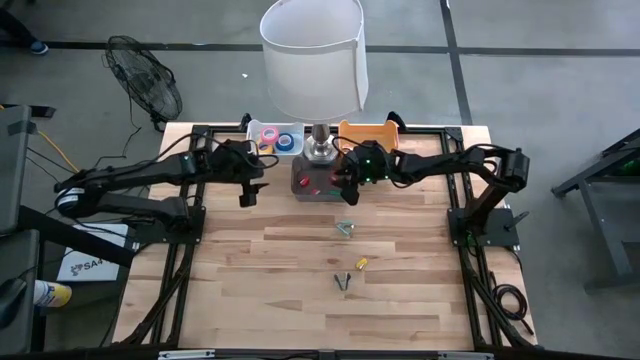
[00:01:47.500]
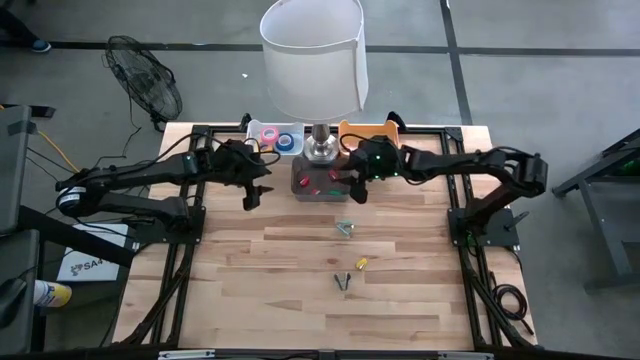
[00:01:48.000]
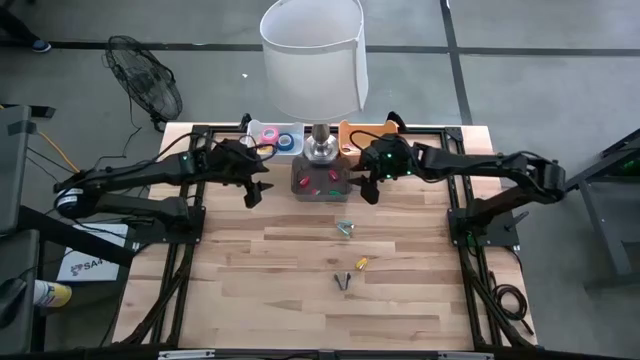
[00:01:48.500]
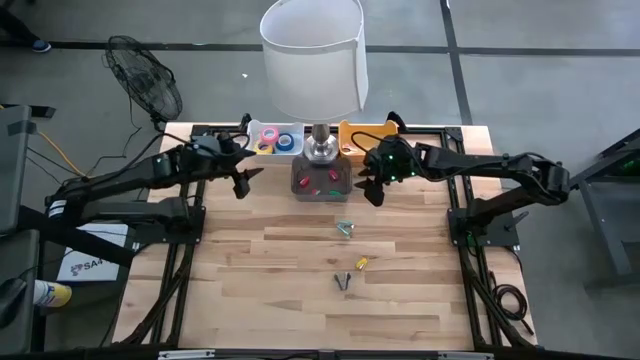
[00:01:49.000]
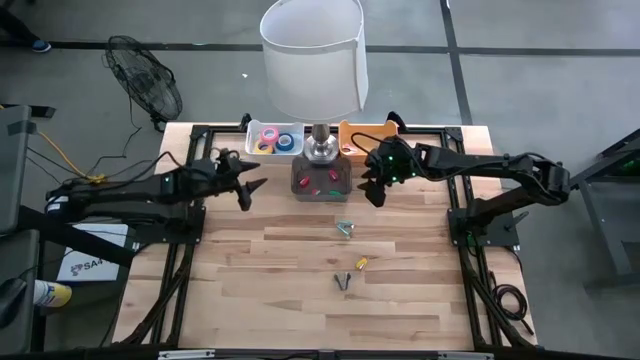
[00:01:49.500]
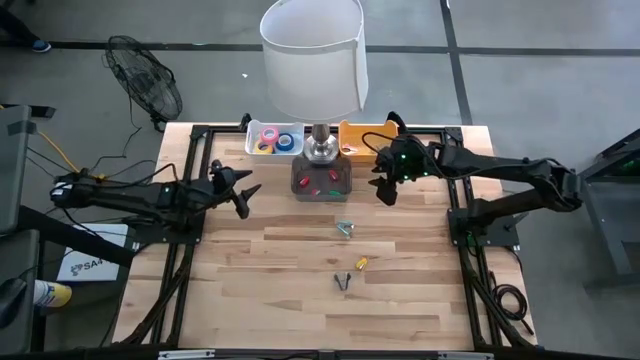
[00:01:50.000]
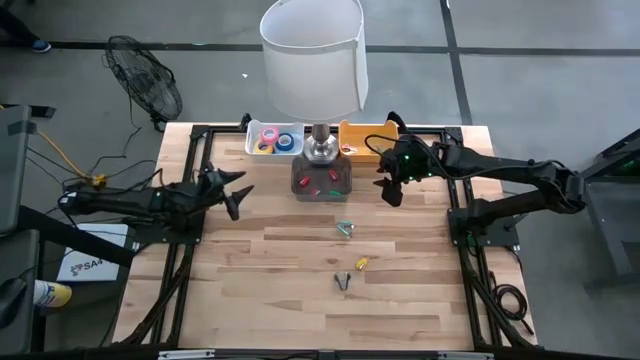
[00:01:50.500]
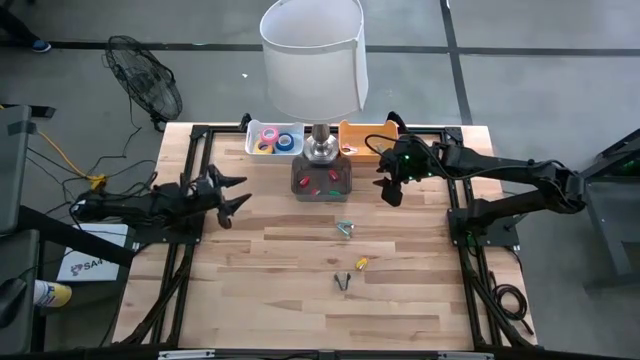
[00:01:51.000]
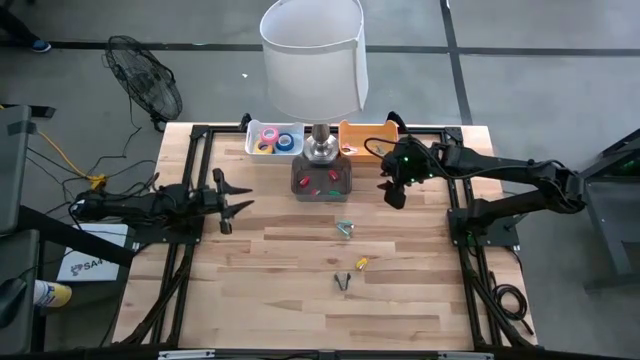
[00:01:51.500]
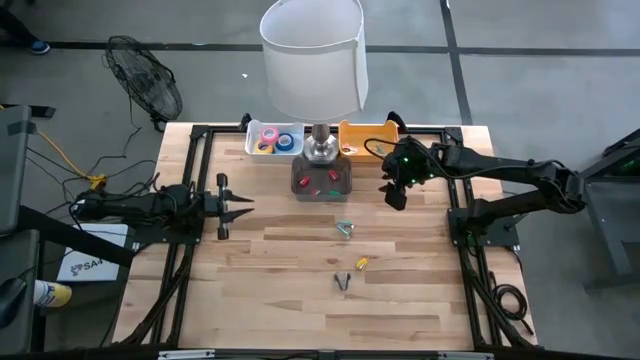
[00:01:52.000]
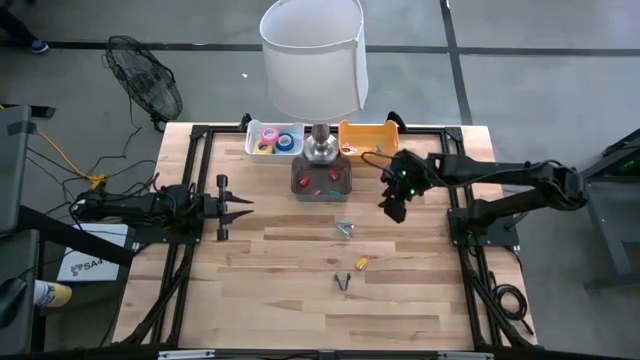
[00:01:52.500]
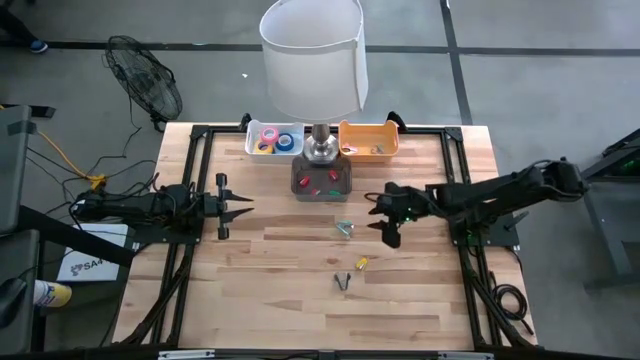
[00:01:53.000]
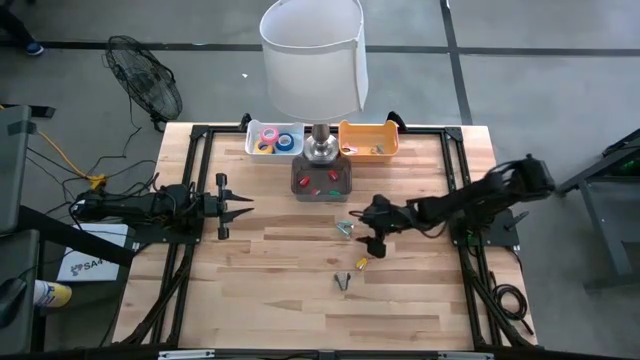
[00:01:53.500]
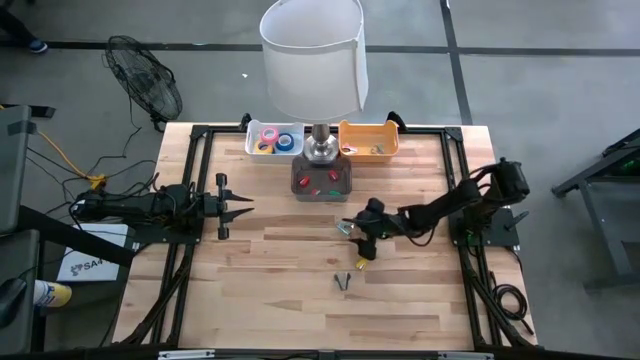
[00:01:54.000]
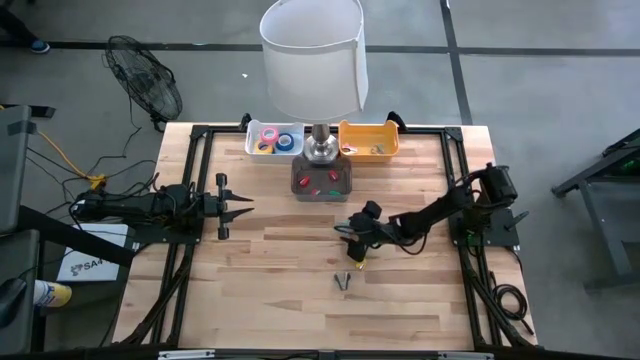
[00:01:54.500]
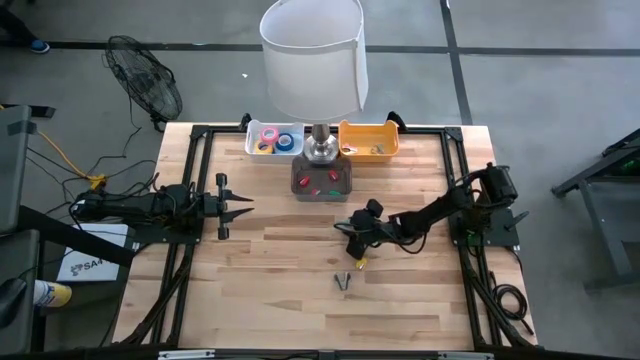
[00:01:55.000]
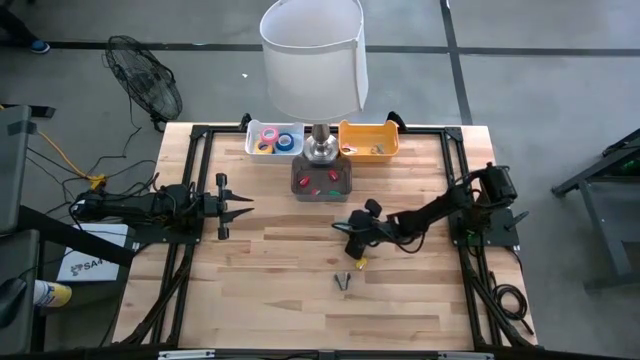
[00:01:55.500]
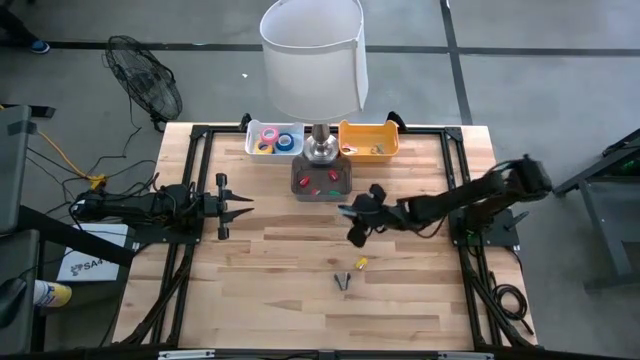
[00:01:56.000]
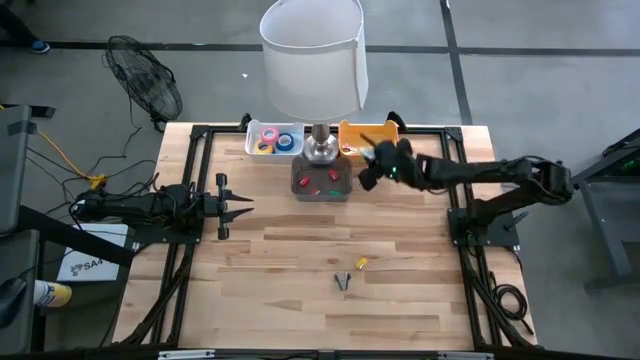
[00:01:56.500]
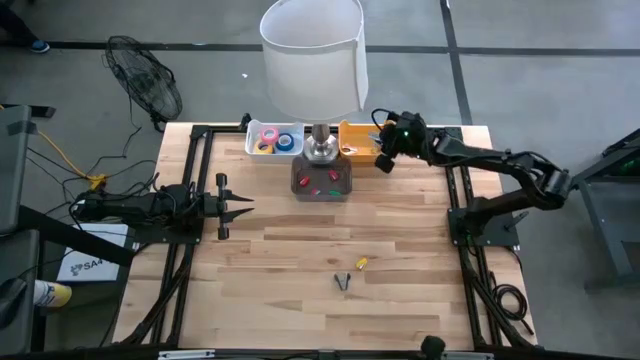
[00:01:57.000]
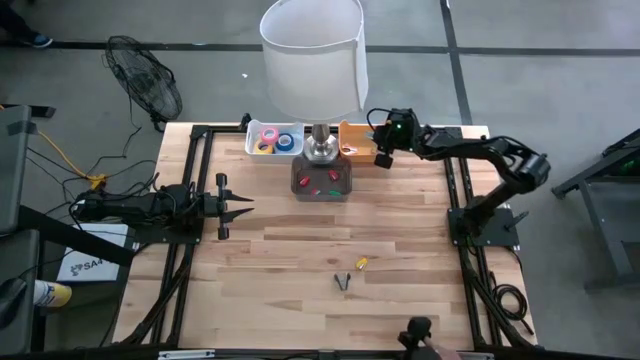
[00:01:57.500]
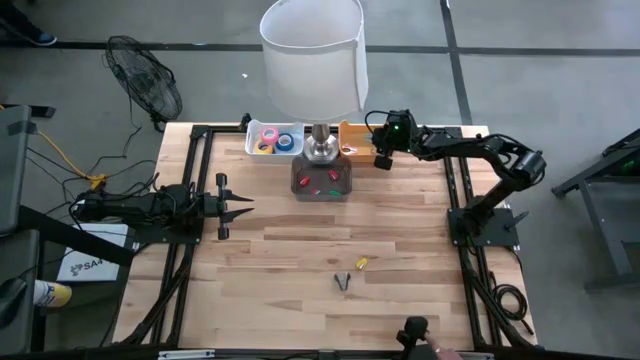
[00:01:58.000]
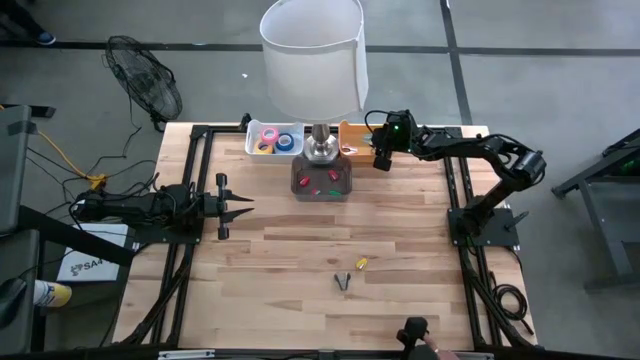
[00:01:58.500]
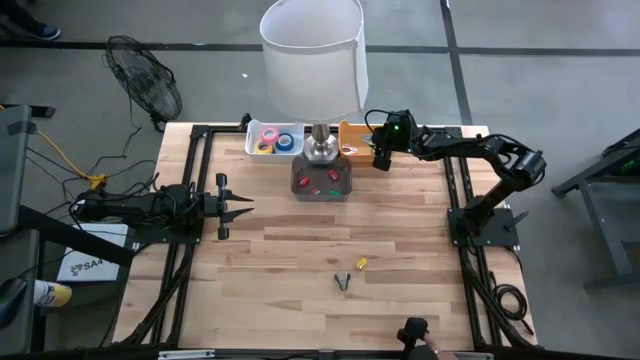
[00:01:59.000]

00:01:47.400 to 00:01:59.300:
Task: Pick and place Stapler, Stapler remover, tape
Put the blue staple remover into the yellow bin

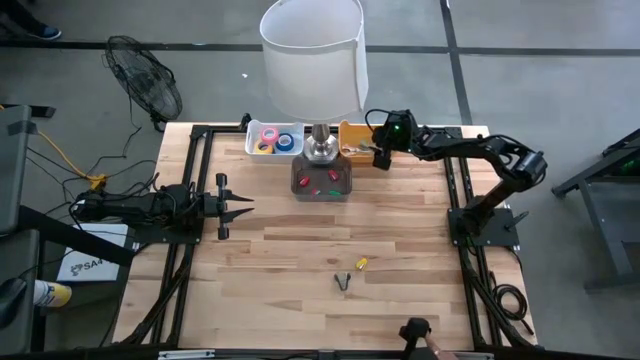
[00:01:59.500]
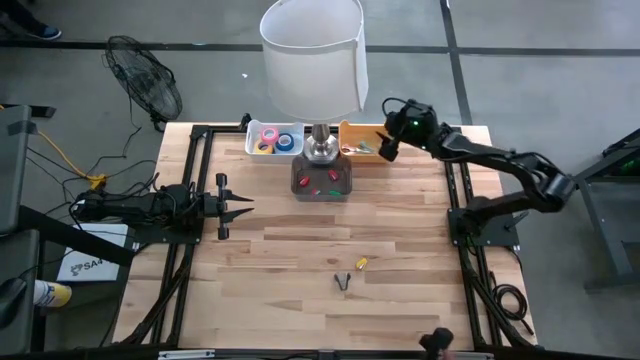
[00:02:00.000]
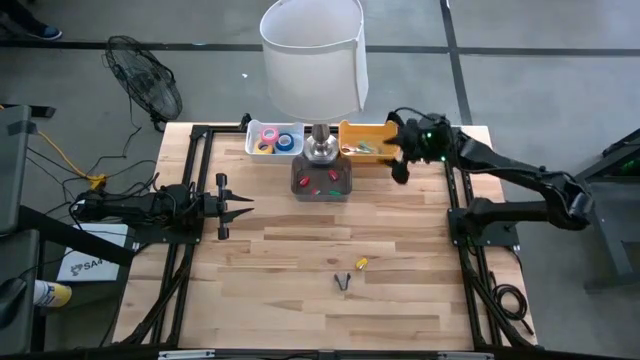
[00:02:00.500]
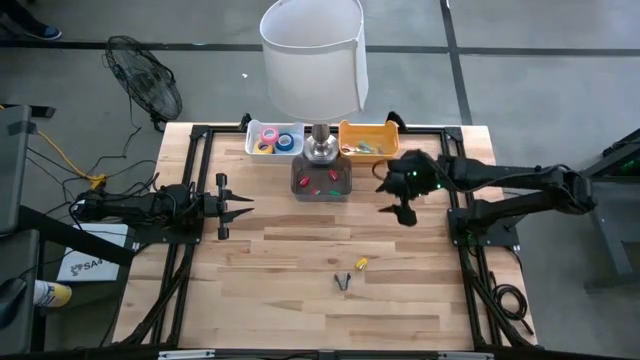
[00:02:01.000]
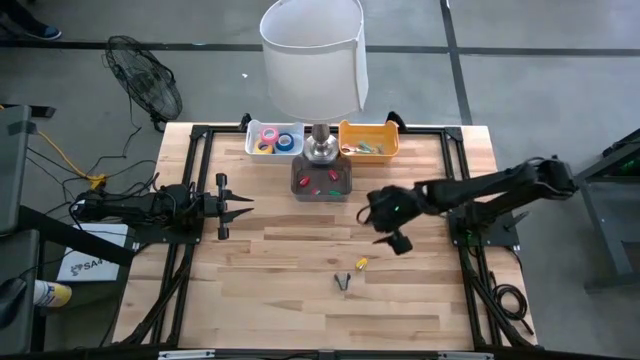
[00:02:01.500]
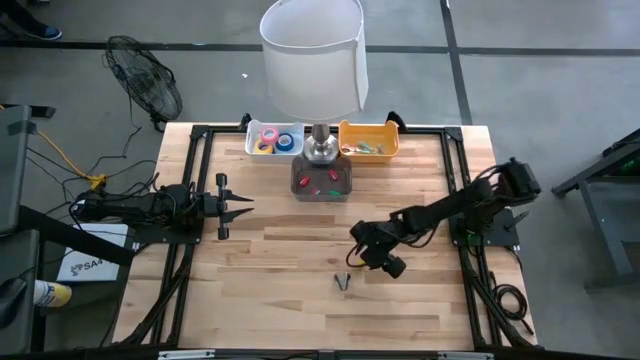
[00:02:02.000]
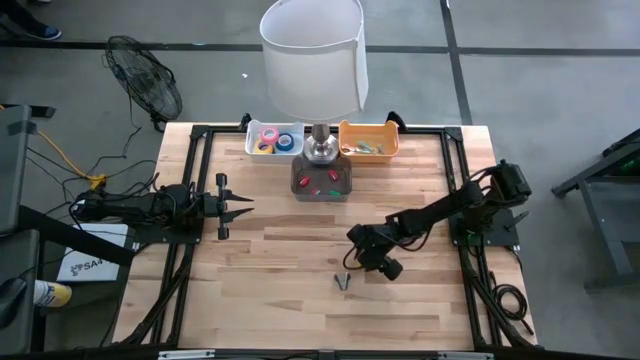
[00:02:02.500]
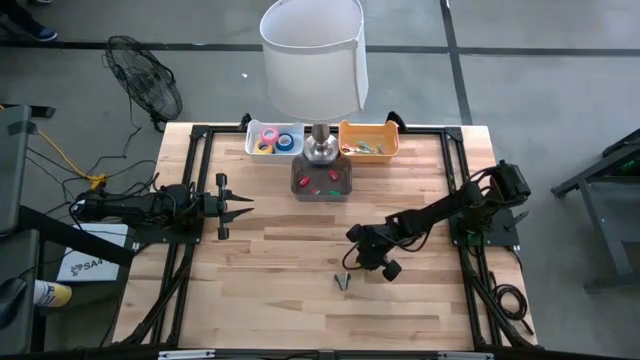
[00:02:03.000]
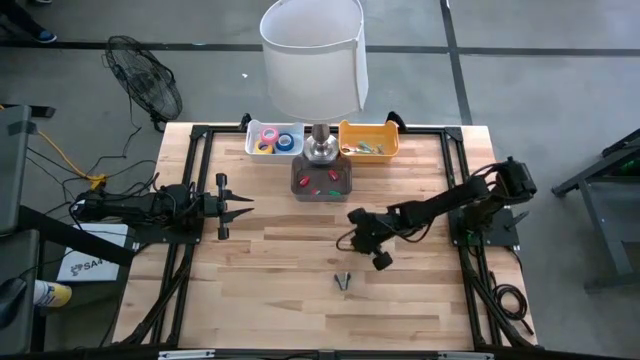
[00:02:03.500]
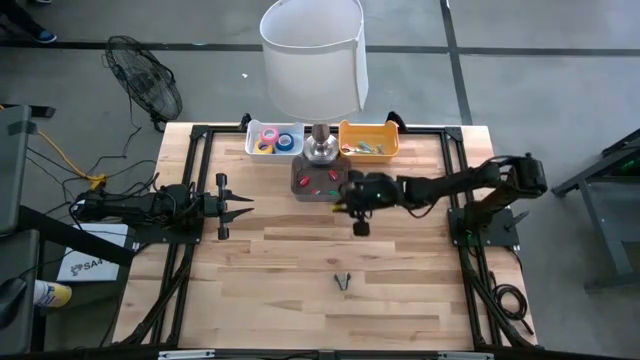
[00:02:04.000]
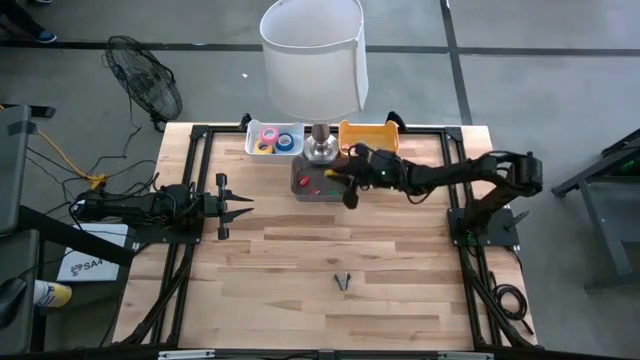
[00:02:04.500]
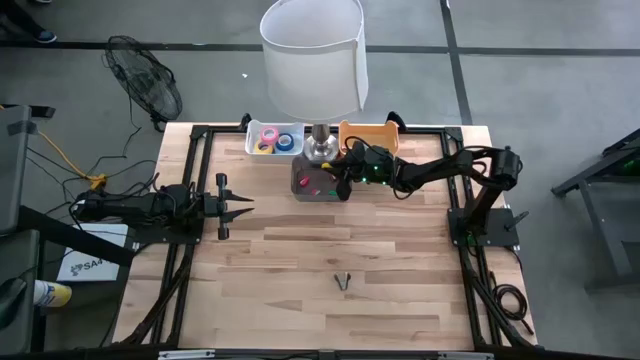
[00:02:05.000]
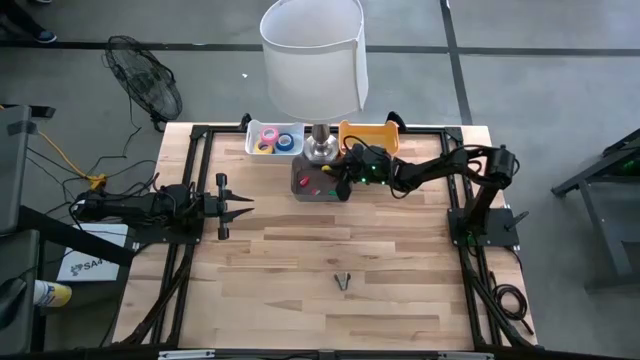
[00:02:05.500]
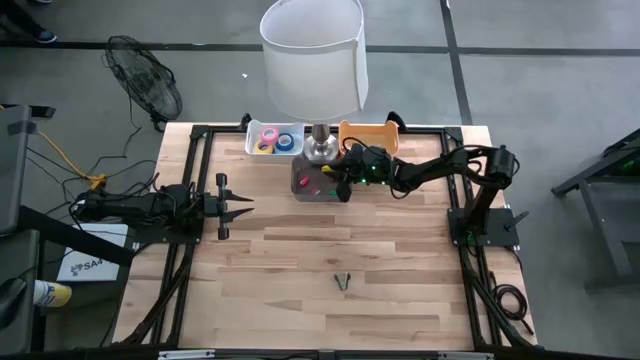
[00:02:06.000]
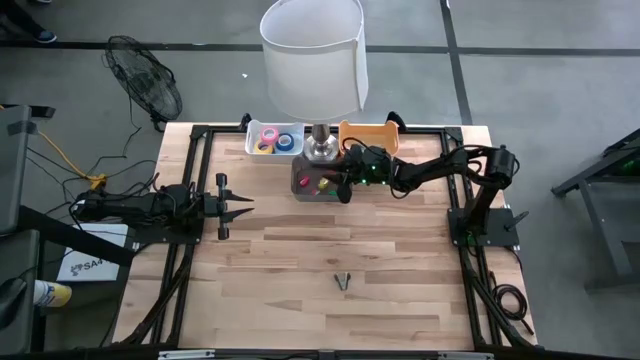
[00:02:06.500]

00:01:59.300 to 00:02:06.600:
Put the yellow stapler into the black bin

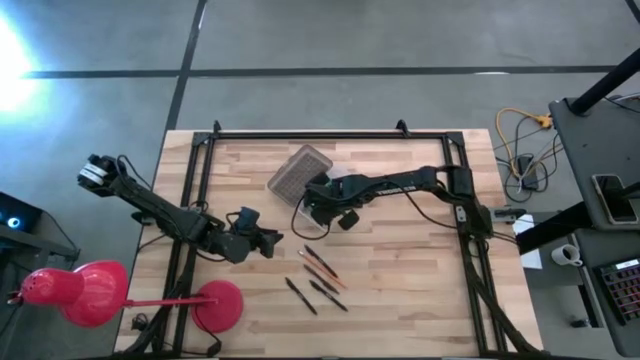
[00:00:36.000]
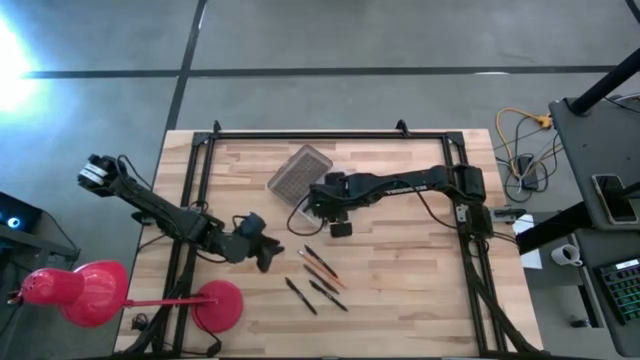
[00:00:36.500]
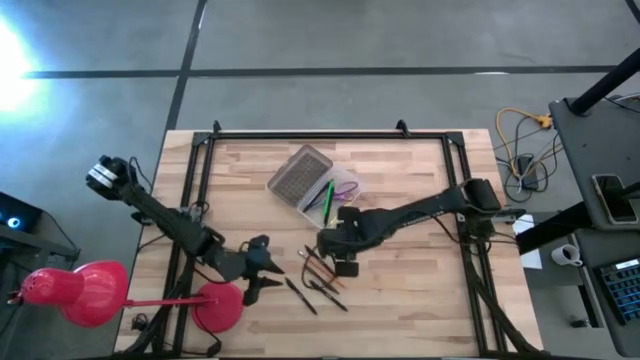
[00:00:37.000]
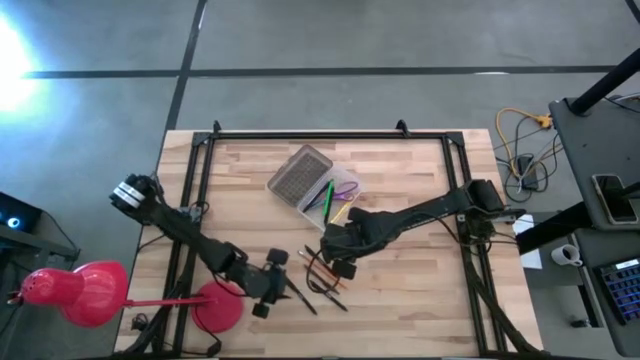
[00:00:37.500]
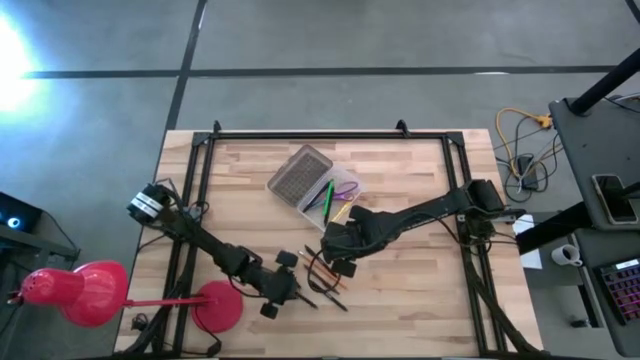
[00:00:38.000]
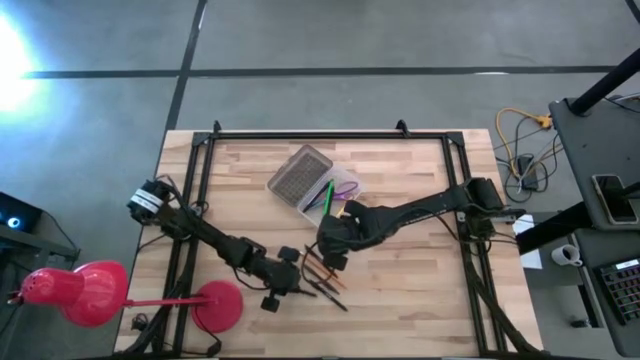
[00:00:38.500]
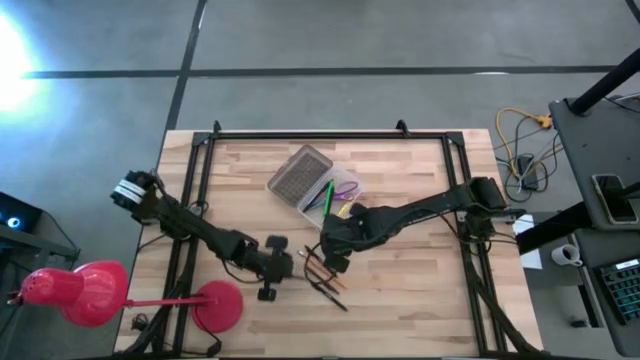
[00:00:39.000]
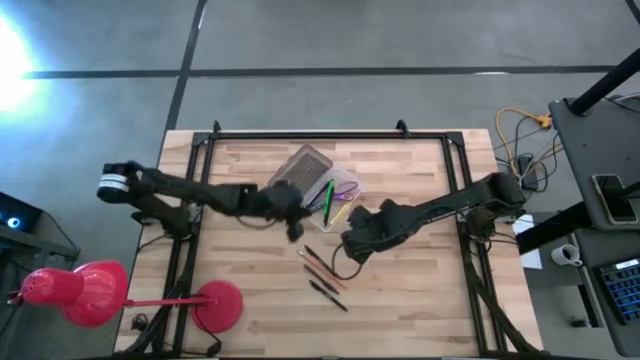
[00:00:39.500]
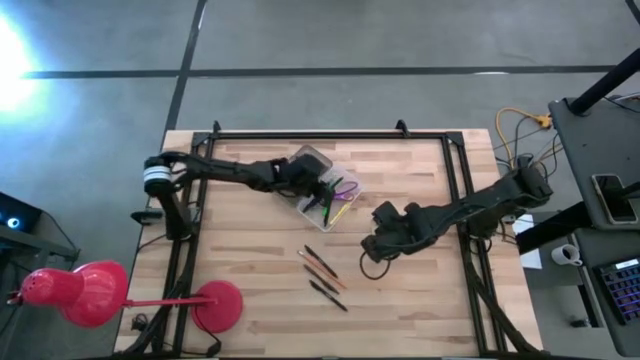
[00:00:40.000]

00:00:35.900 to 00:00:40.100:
Task: Pick & place school supplies into a supply box
Put the black pen into the supply box
